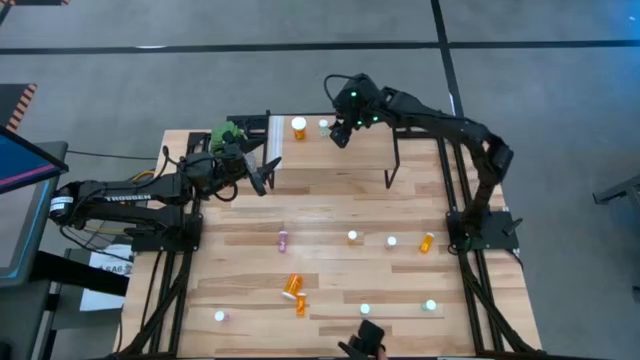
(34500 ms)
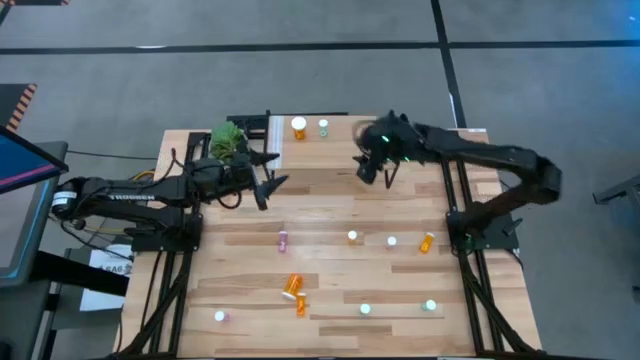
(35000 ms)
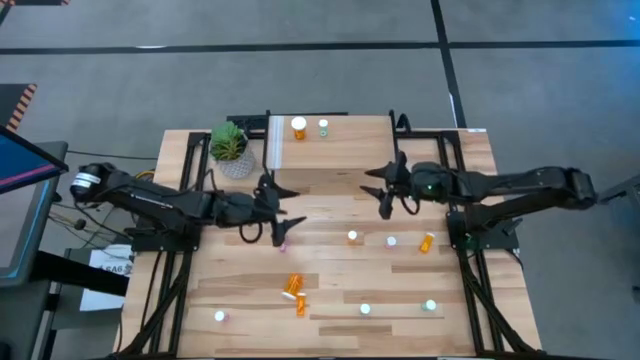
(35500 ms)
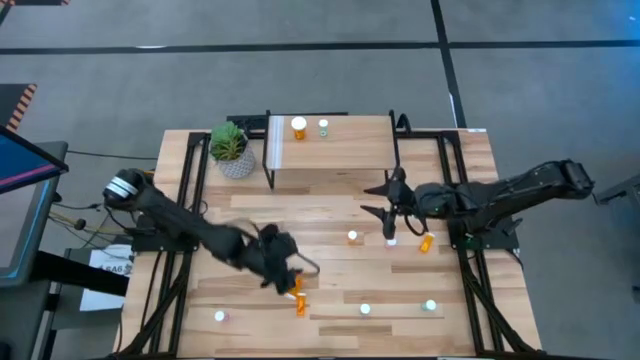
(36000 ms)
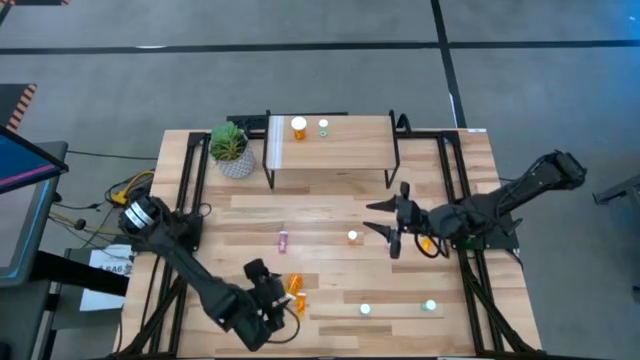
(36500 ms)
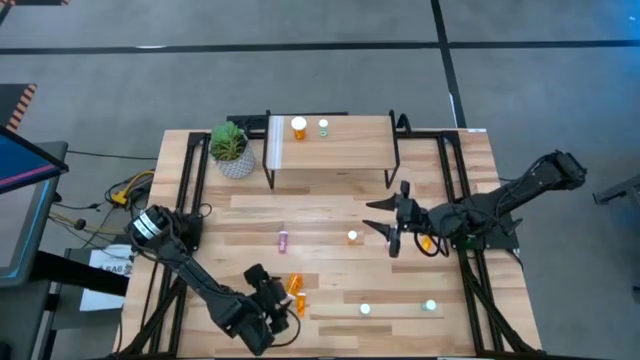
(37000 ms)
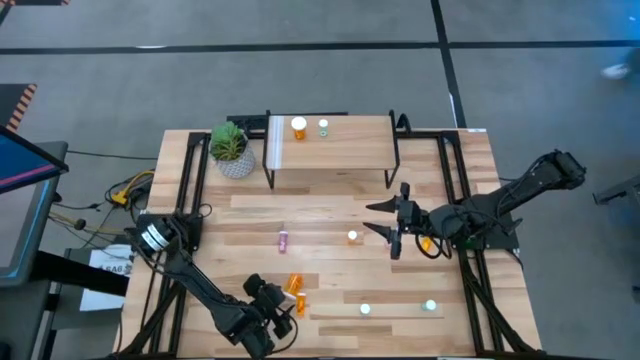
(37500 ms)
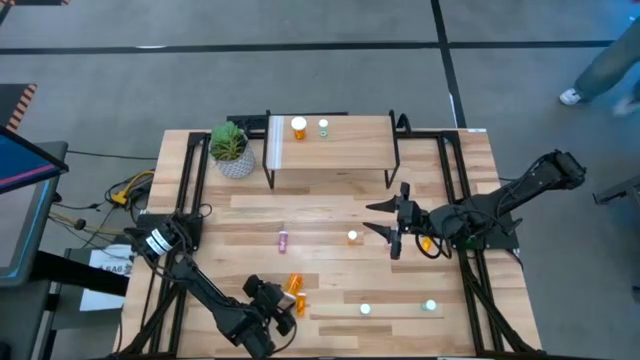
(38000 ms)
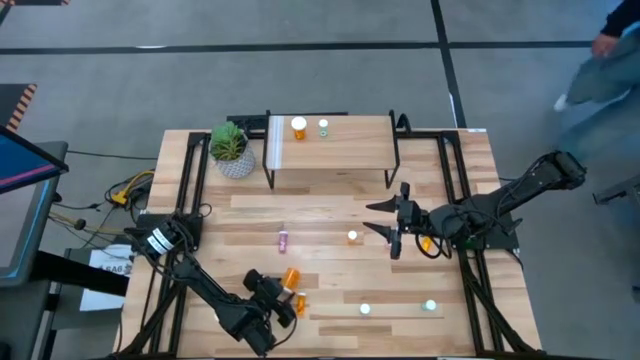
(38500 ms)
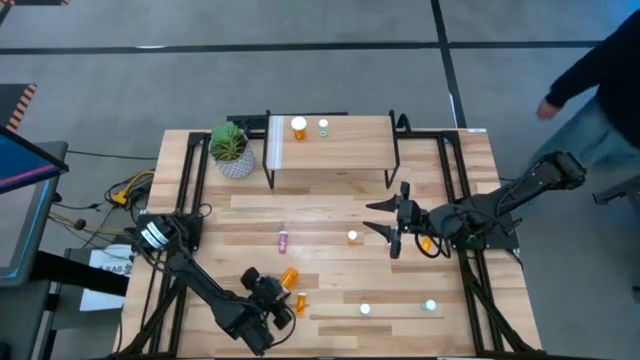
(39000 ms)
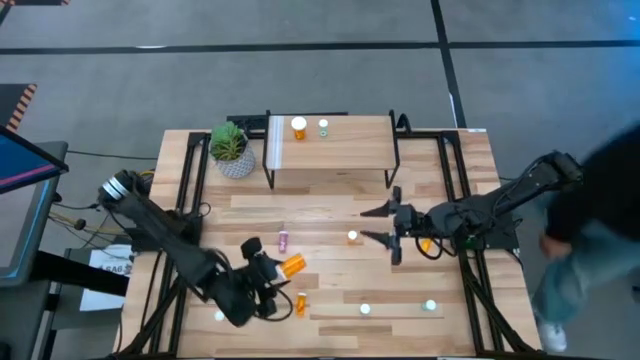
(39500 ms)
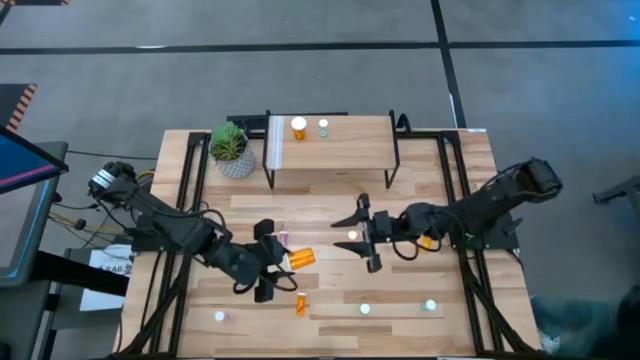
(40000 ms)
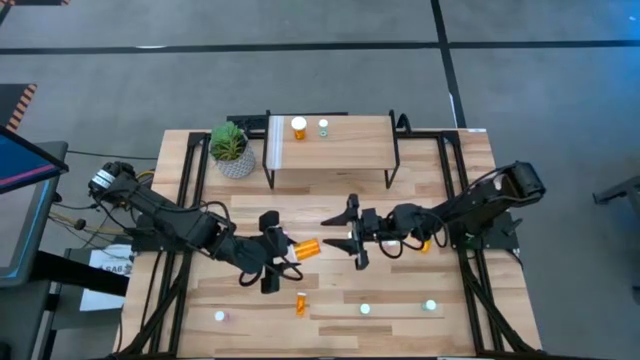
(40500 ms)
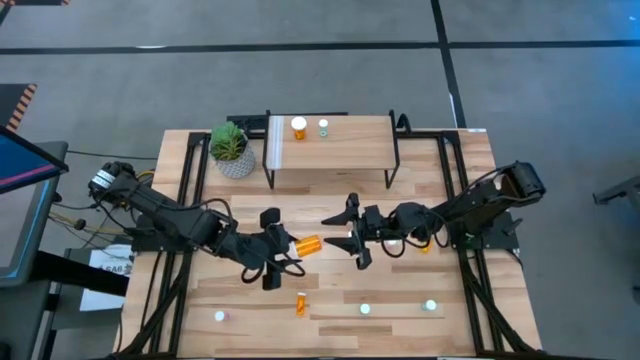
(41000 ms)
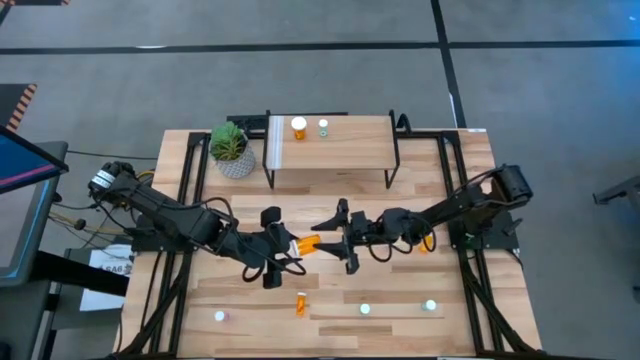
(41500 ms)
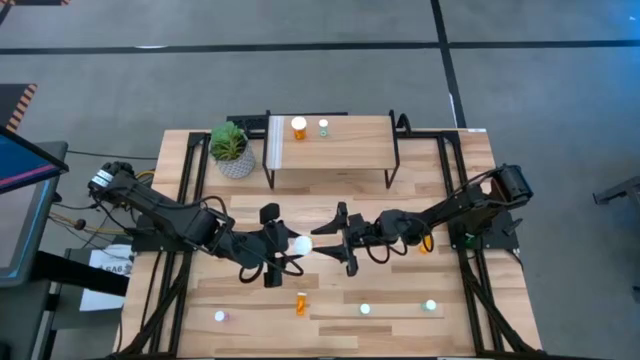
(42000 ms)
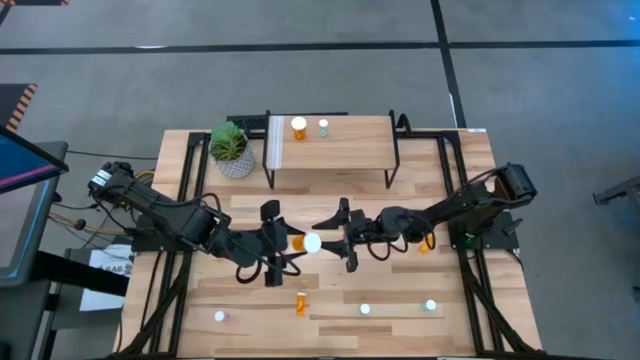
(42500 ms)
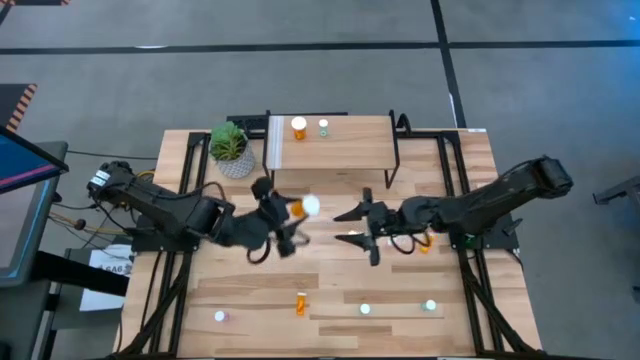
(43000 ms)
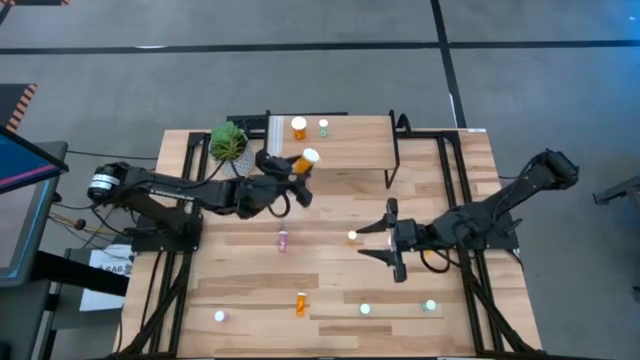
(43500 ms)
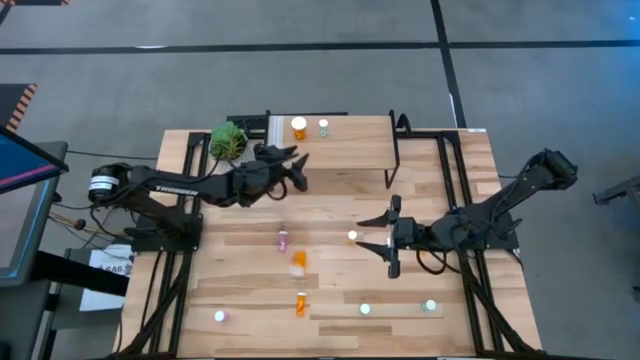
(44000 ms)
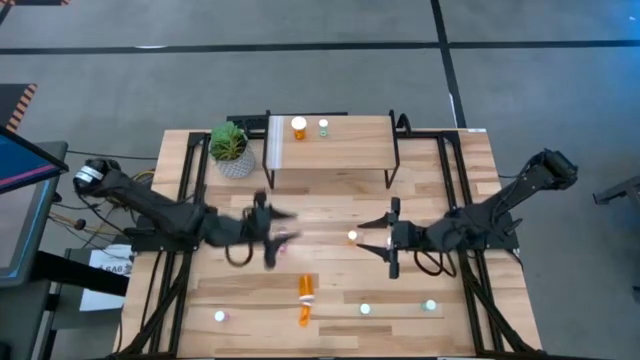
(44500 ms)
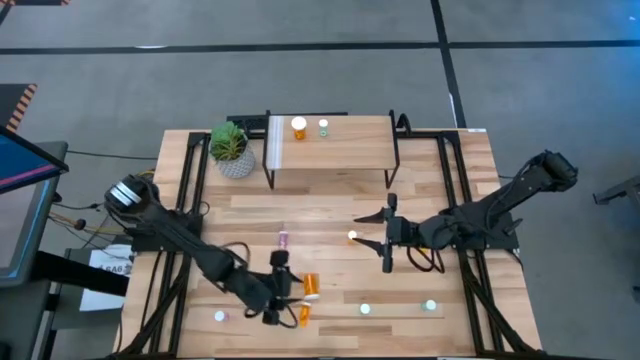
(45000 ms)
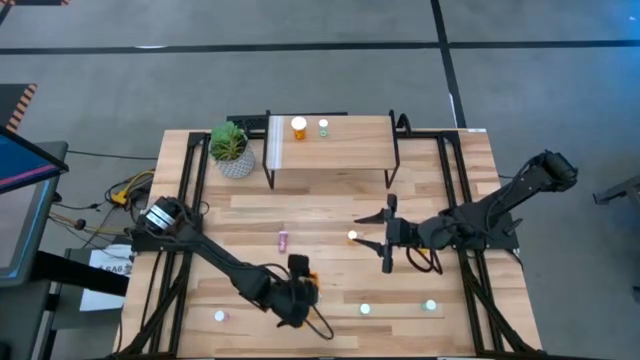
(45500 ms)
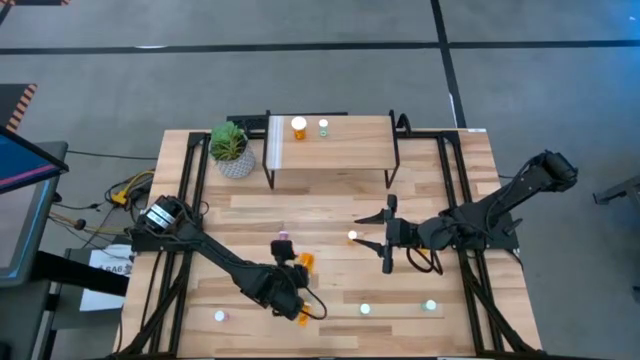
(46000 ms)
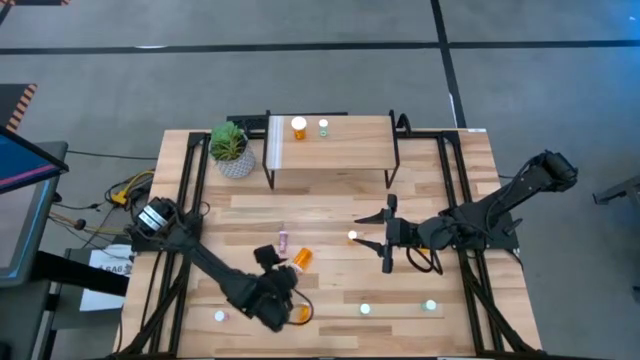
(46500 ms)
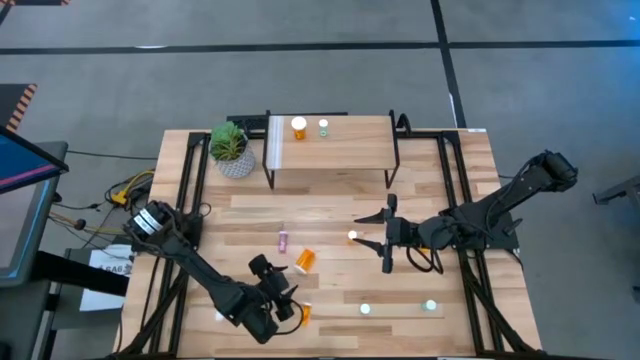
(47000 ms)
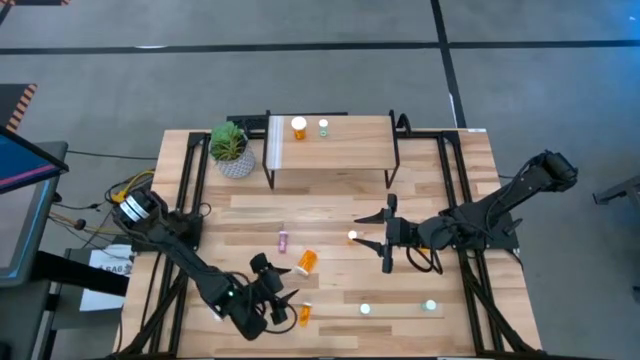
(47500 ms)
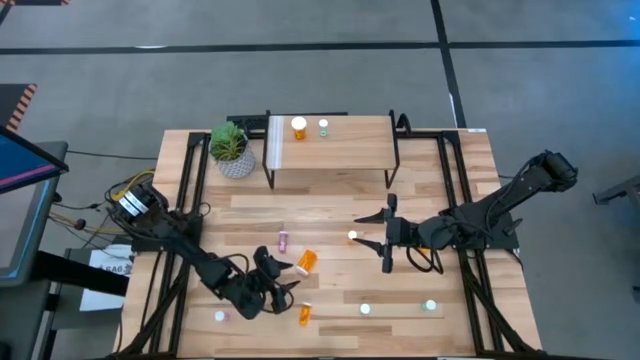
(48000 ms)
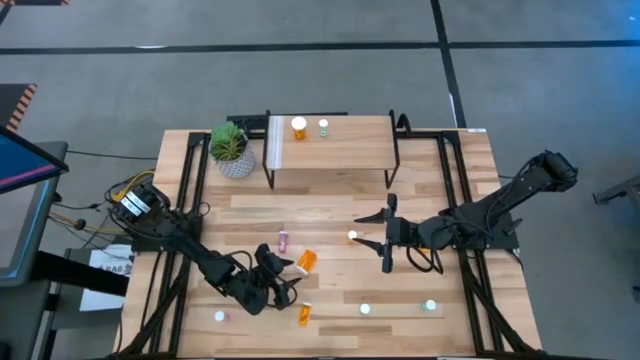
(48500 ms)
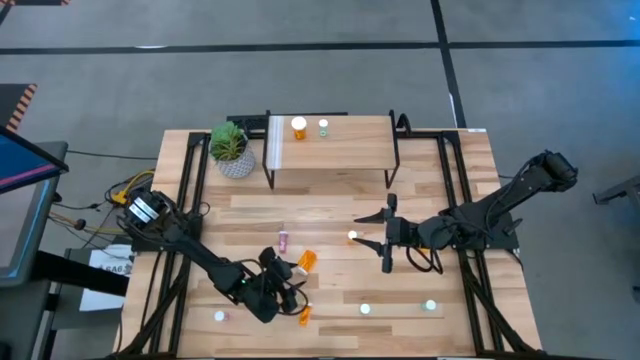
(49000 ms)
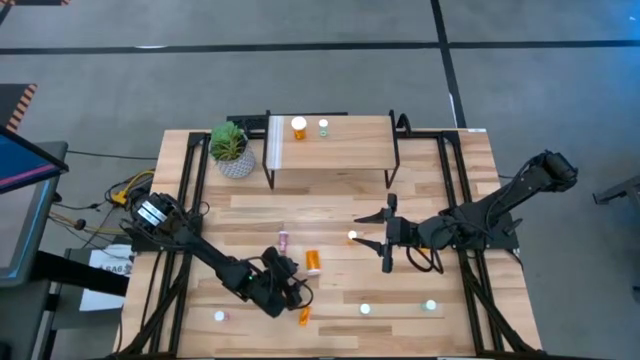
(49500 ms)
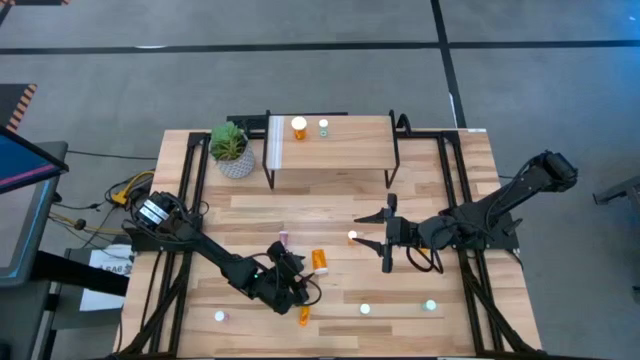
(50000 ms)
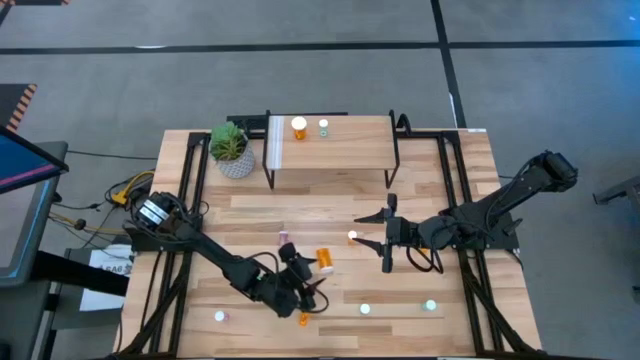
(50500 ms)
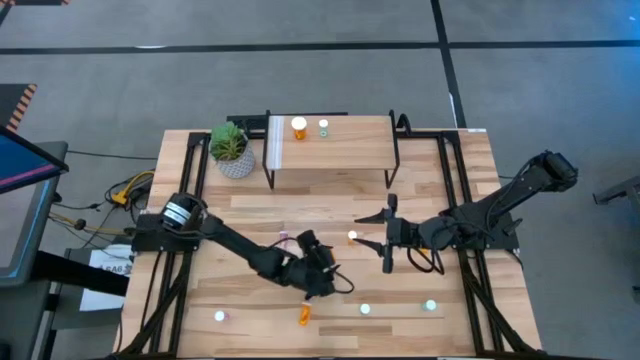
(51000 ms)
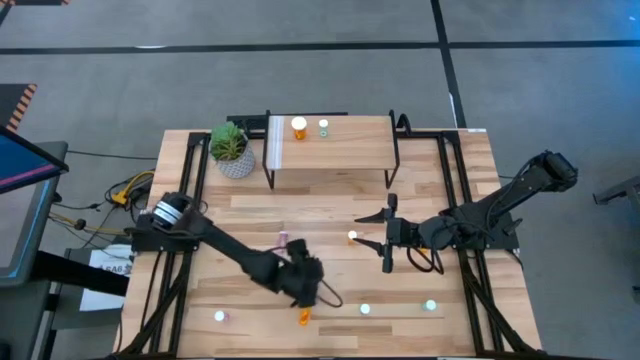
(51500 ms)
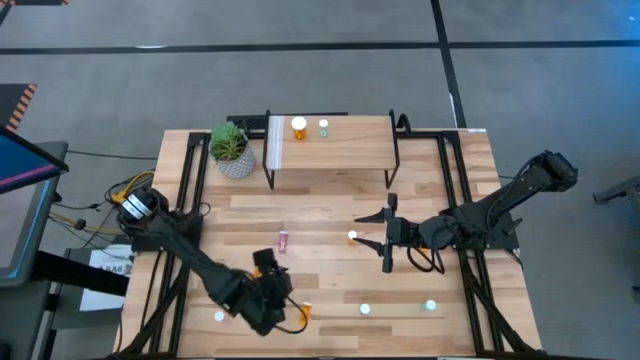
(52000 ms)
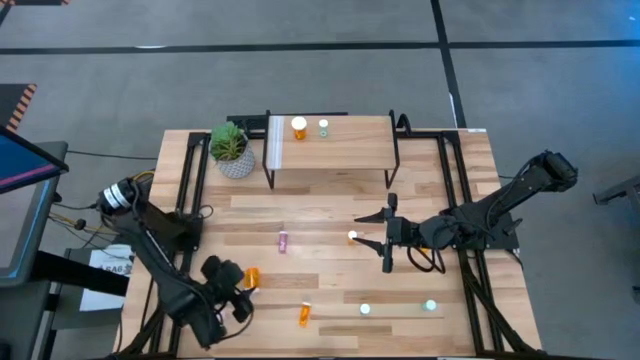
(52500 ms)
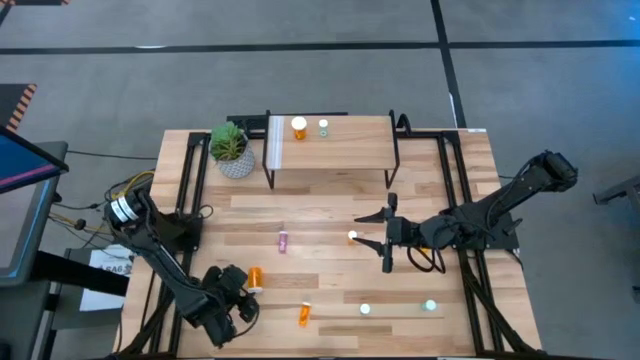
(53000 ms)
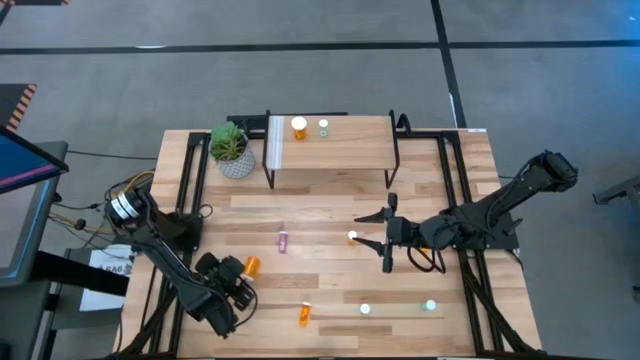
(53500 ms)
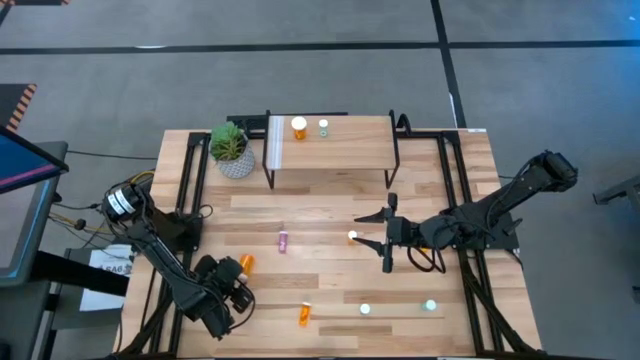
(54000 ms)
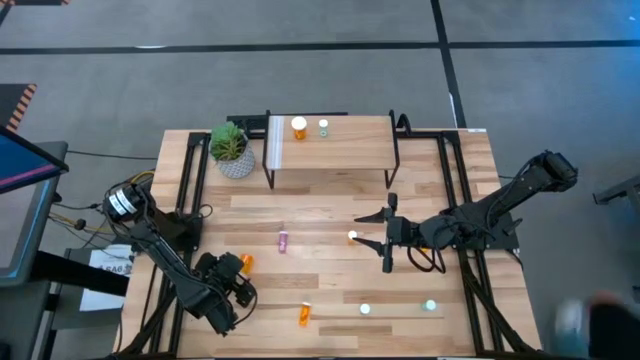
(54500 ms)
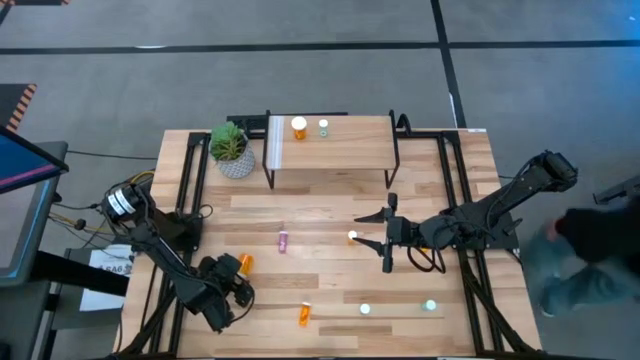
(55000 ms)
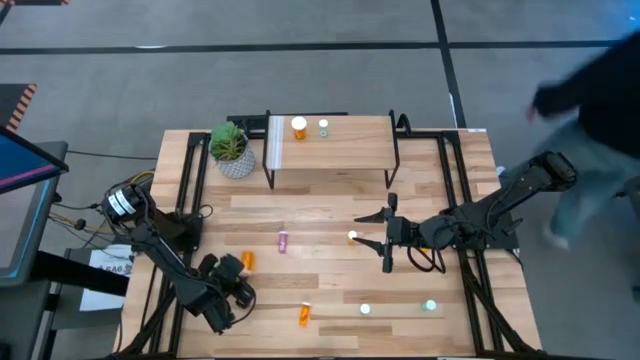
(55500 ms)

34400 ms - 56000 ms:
Task: Pick and place medicine bottles onto shelf by color
Put the big orange pill bottle on the shelf aligned with the other big orange pill bottle
